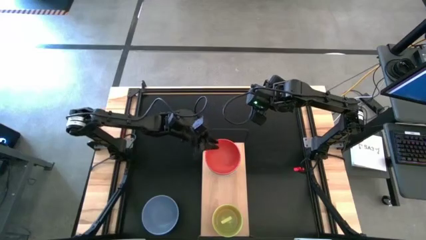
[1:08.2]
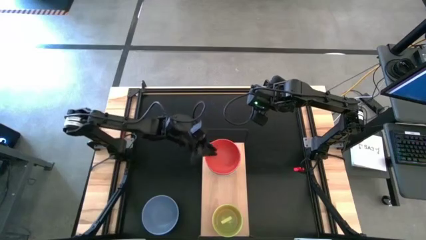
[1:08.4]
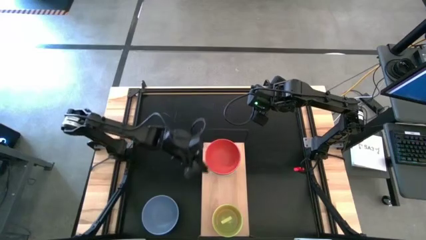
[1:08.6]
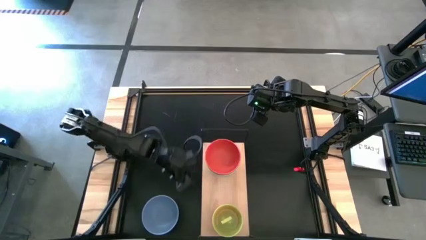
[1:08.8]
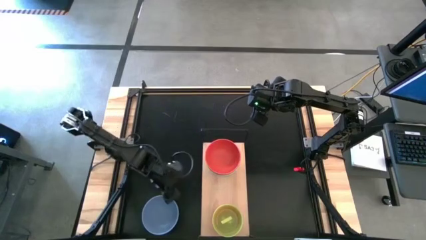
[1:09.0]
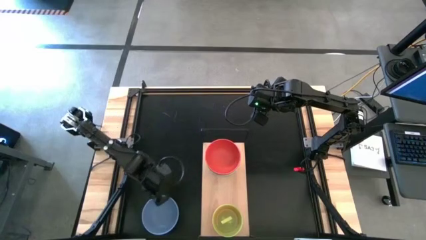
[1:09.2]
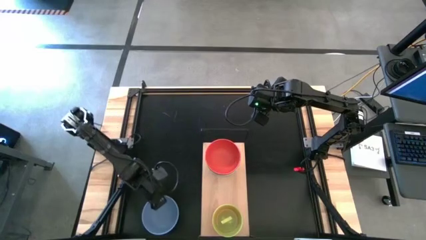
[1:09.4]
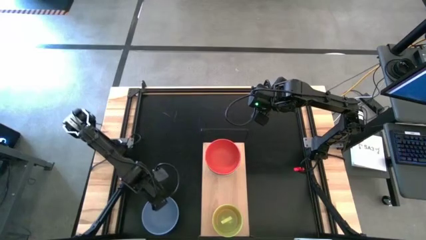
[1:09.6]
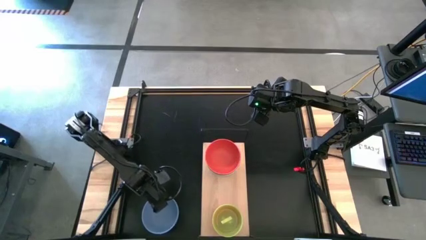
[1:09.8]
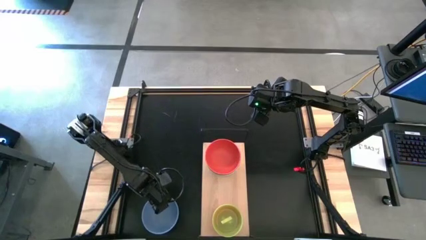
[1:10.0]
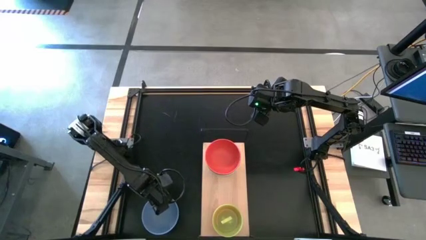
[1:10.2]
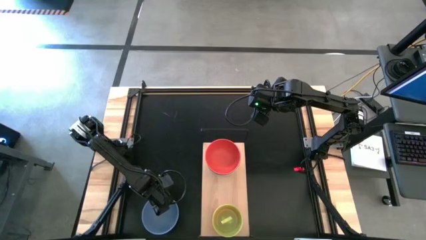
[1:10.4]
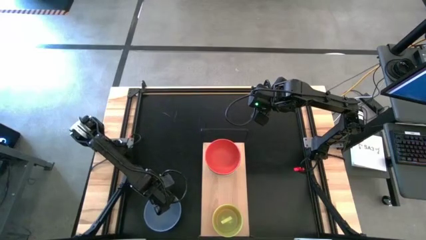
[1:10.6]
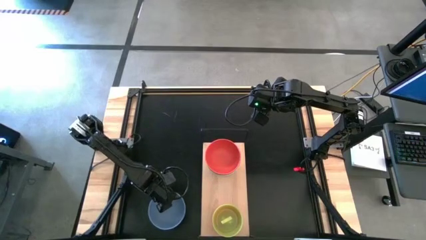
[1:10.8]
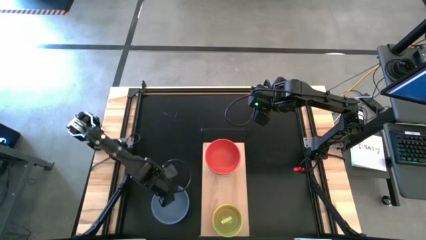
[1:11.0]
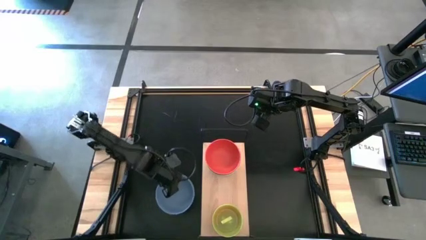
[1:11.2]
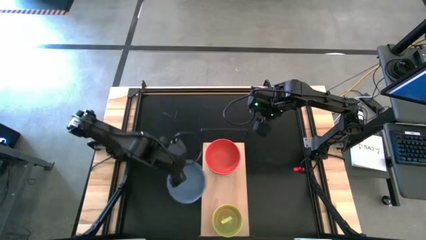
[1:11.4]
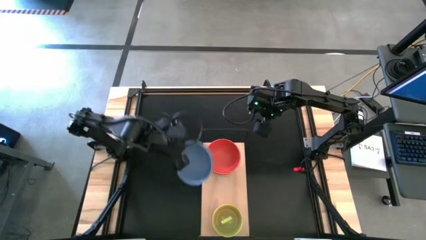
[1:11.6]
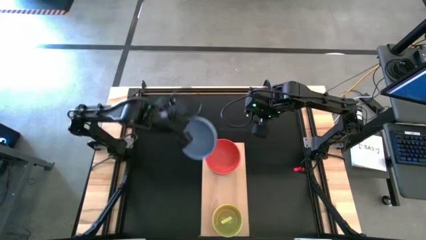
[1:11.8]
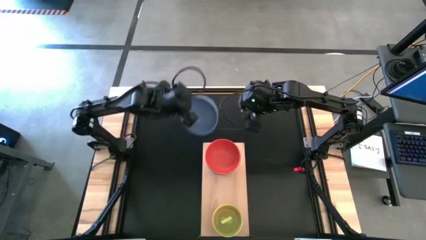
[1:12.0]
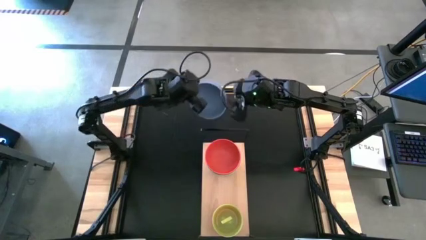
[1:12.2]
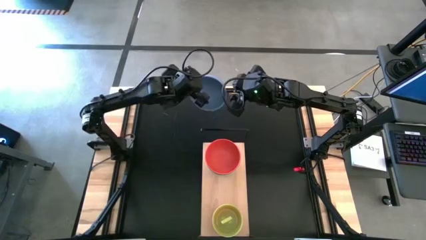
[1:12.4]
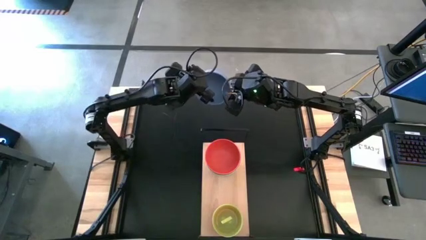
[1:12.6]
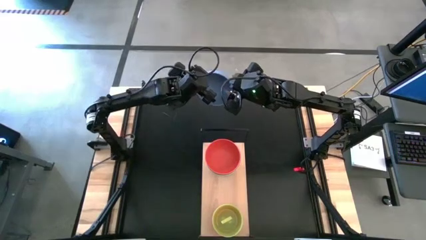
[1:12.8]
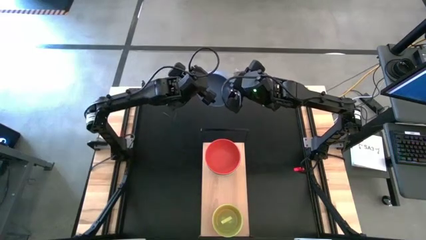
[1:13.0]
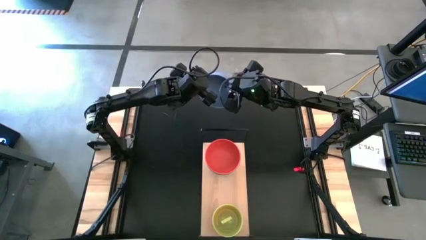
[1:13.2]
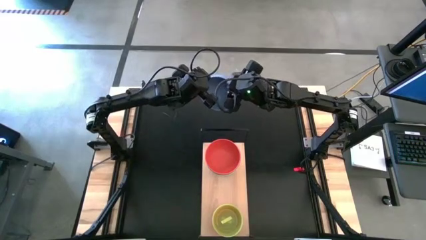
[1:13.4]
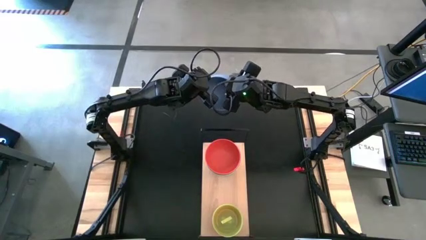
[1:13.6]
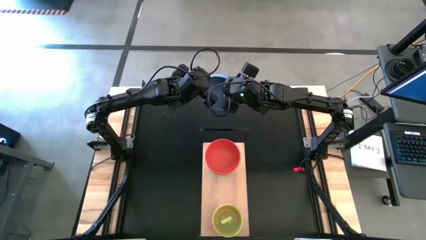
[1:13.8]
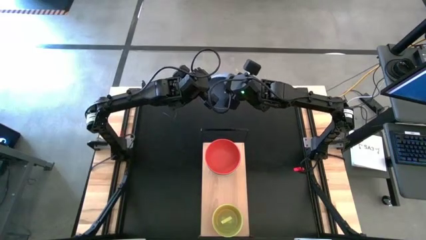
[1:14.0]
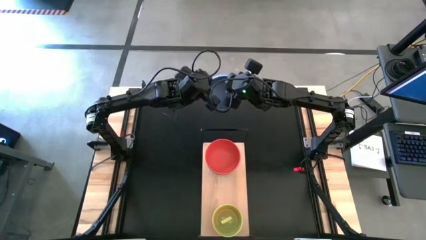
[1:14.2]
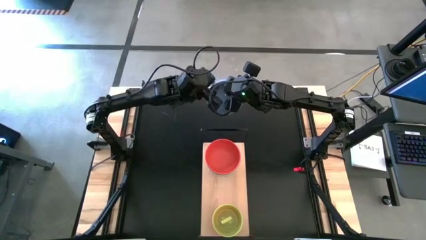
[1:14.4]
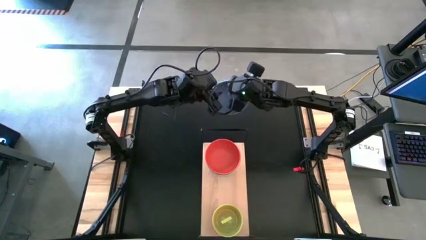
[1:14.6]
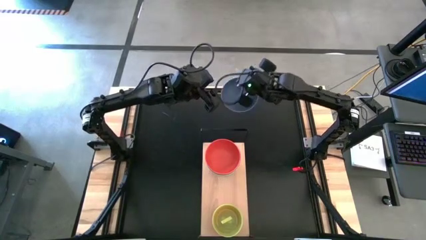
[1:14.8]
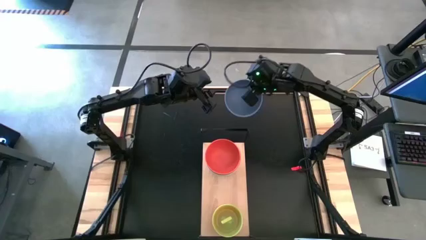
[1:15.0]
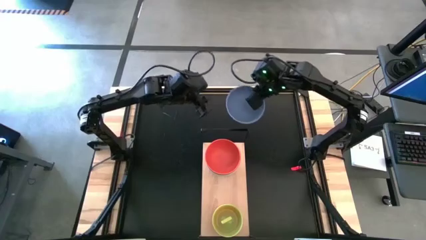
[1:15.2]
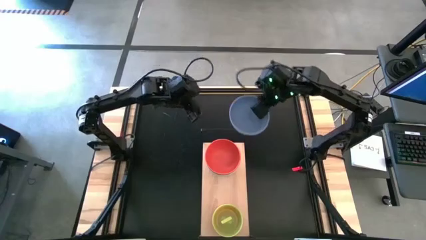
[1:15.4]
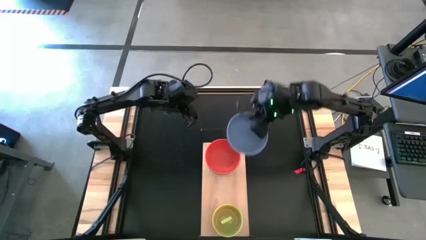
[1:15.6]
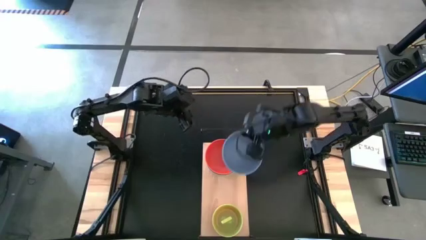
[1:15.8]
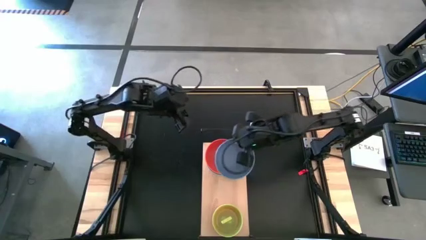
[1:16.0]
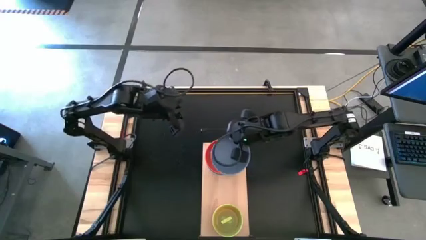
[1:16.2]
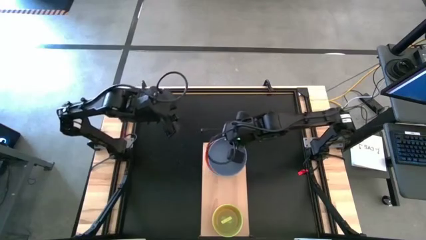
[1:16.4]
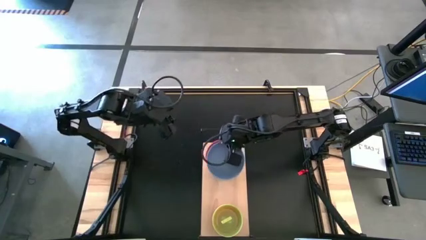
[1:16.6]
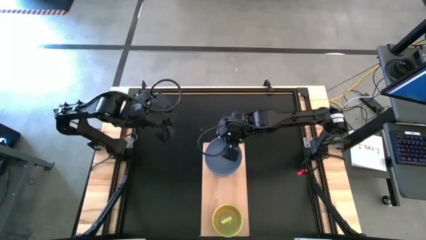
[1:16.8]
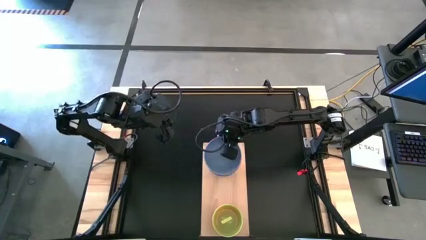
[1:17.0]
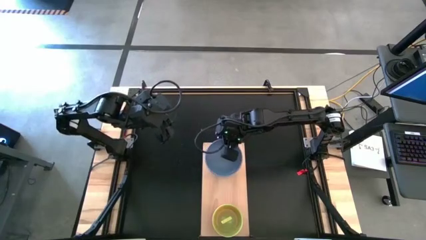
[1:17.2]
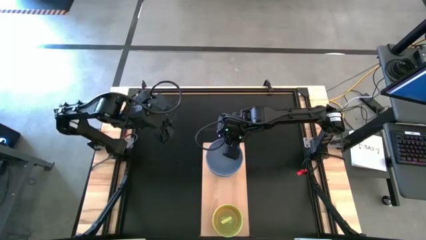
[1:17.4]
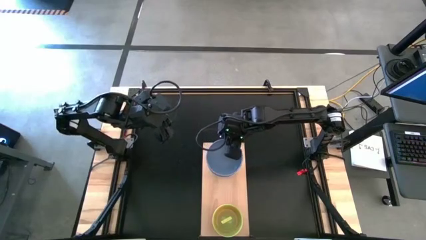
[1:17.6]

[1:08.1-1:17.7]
Task: Place and stack bowls onto a shelf
Stack the large gray bowl on top of the large green bowl on the shelf

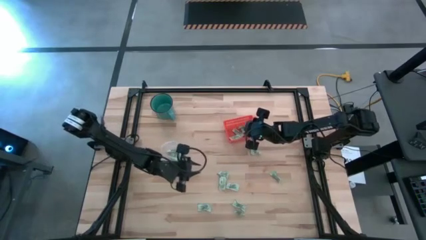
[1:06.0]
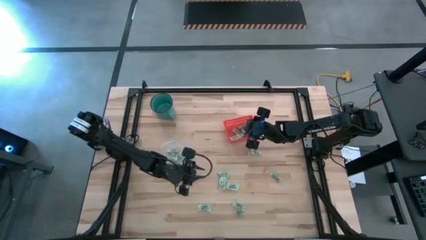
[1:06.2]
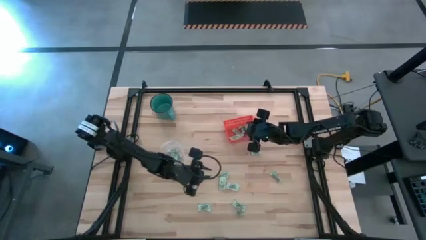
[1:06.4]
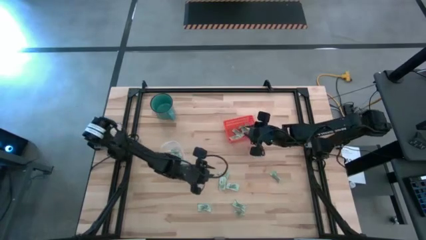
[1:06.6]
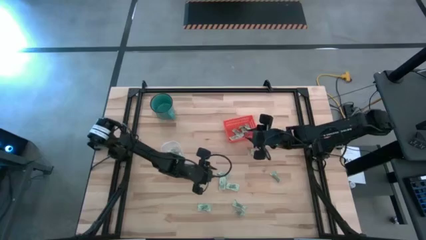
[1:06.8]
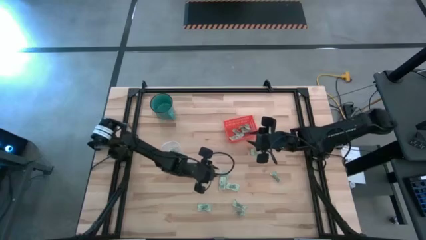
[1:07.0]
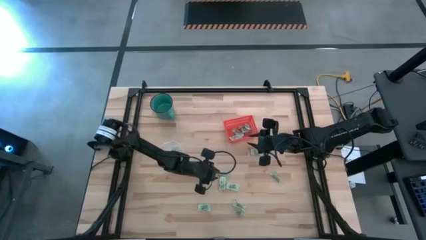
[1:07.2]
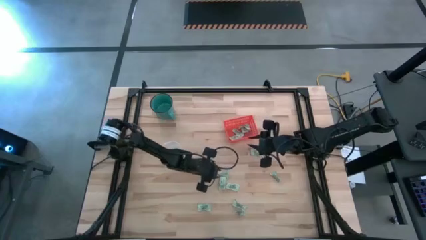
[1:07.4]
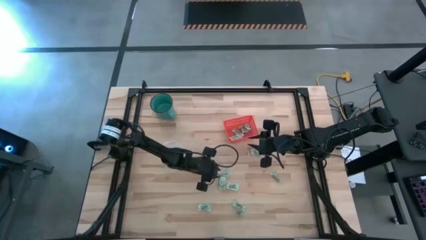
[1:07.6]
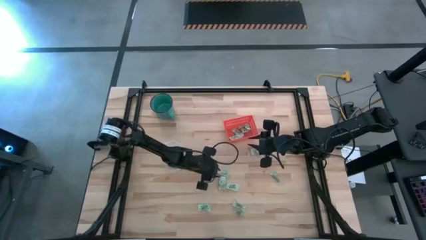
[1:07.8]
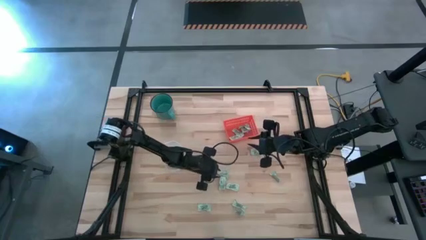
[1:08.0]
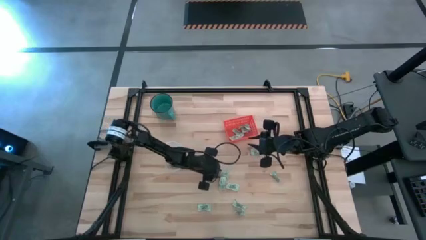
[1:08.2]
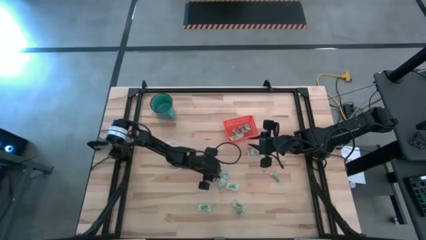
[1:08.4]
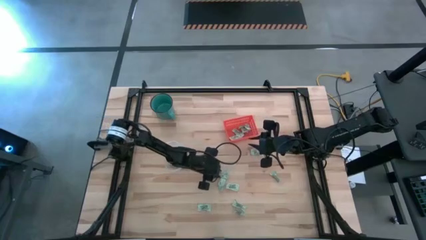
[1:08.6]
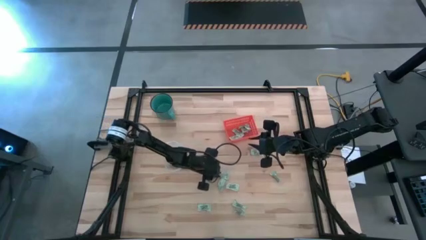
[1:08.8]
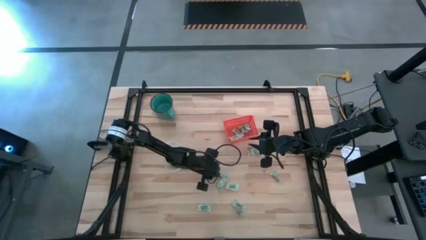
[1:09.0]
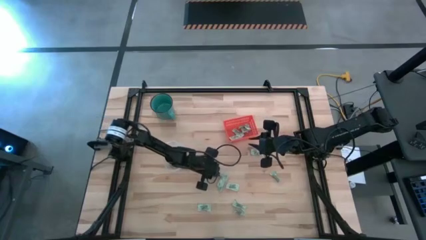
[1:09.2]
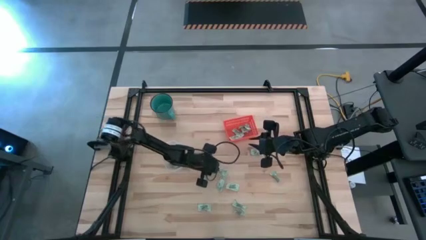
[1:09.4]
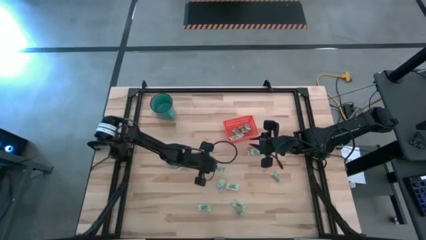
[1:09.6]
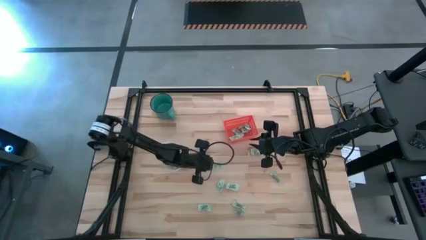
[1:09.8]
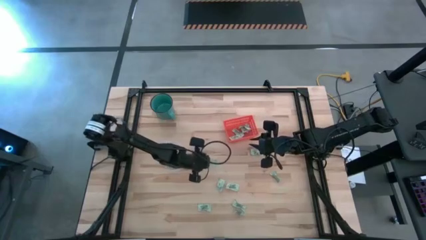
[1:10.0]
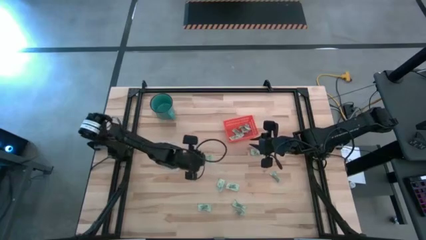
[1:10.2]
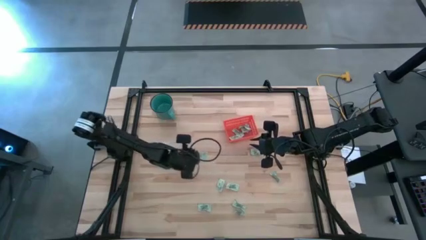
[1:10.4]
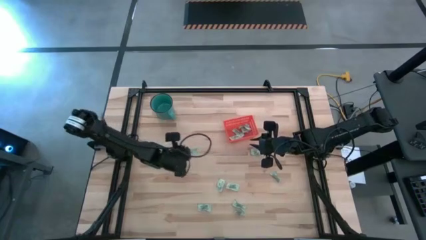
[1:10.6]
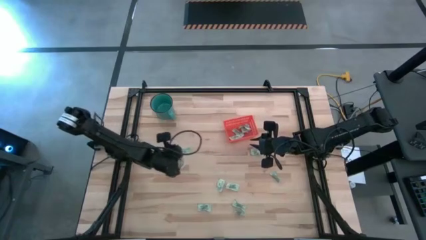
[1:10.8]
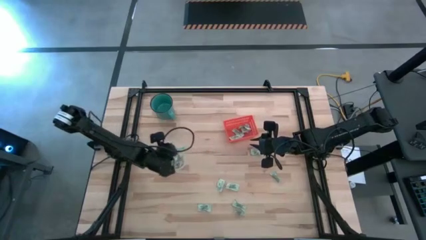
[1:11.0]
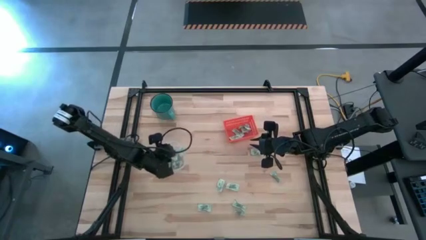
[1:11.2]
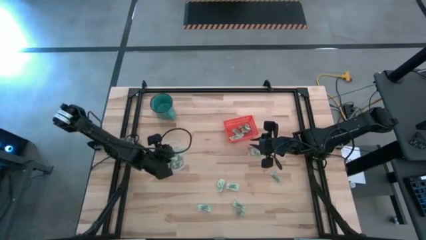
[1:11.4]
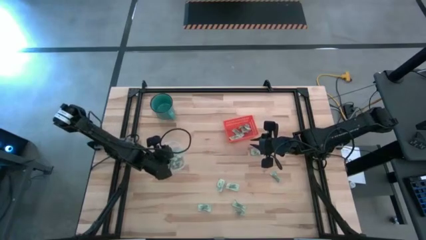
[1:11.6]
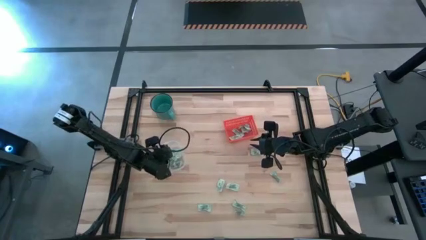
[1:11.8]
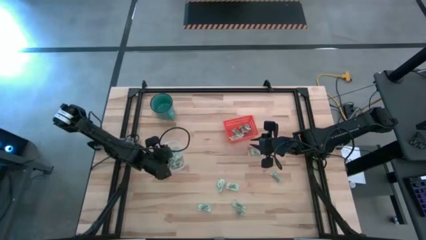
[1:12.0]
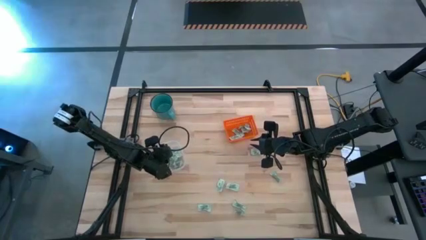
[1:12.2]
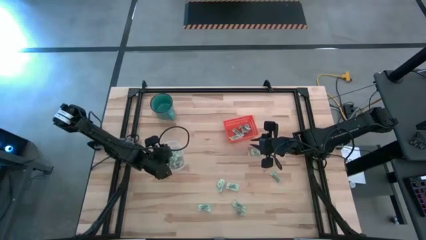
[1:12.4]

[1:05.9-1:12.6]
Task: Pick and place items into bin
Put the light green stevia packet into the transparent container
